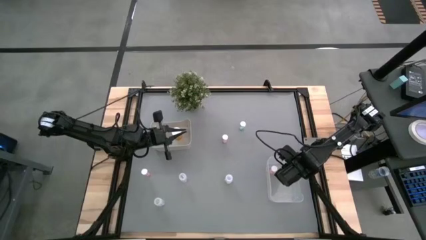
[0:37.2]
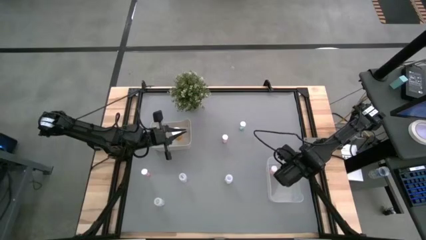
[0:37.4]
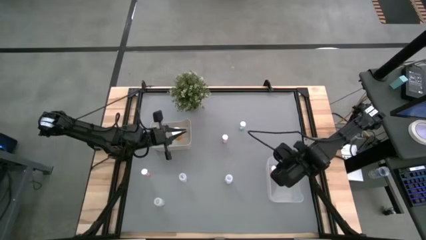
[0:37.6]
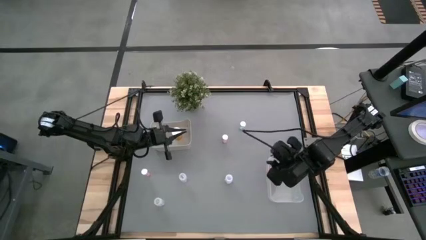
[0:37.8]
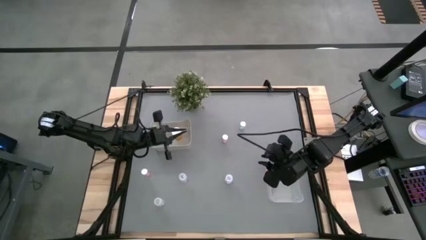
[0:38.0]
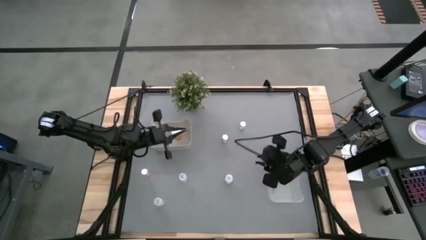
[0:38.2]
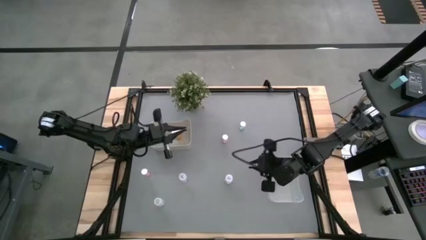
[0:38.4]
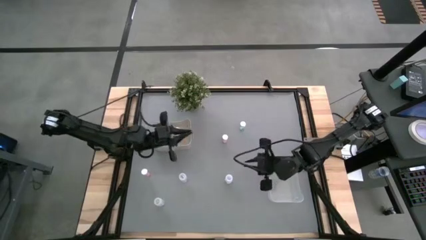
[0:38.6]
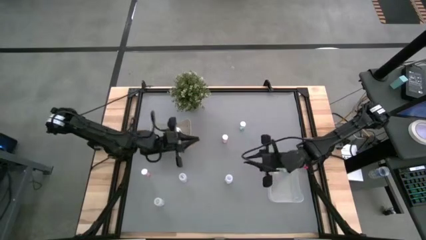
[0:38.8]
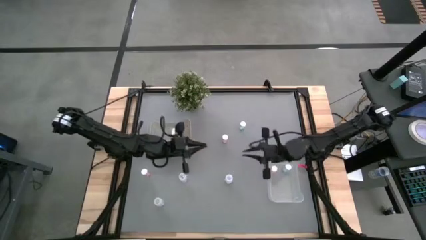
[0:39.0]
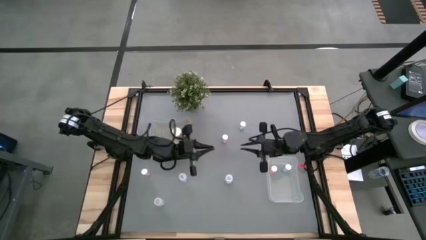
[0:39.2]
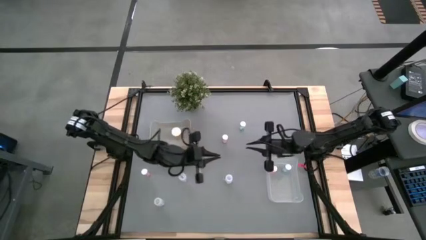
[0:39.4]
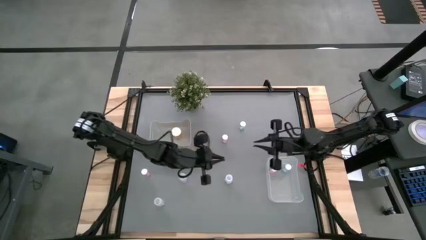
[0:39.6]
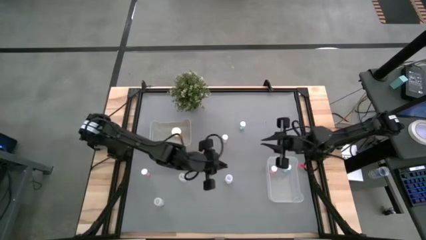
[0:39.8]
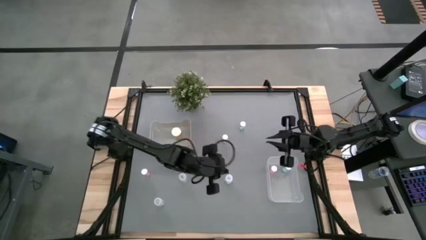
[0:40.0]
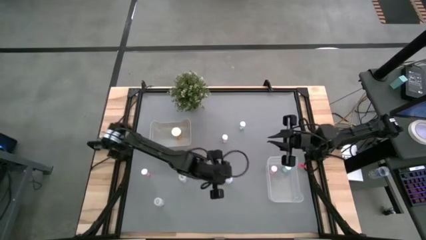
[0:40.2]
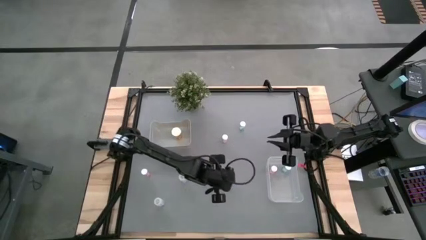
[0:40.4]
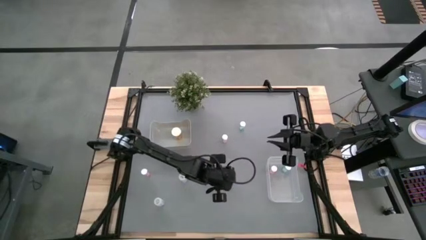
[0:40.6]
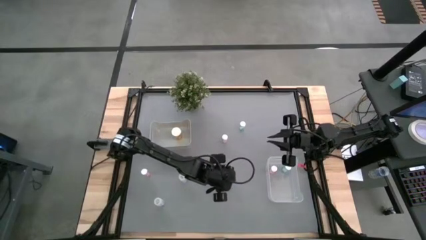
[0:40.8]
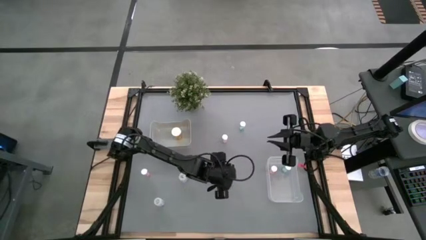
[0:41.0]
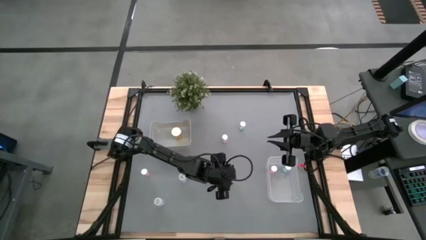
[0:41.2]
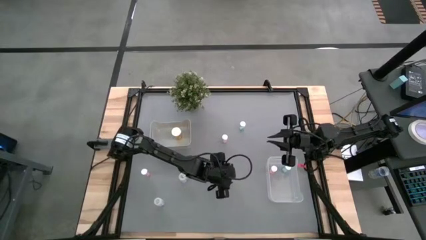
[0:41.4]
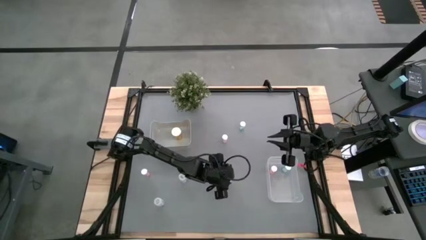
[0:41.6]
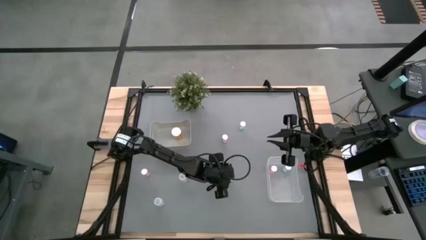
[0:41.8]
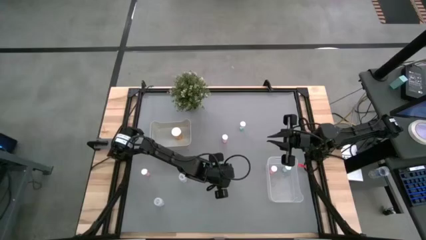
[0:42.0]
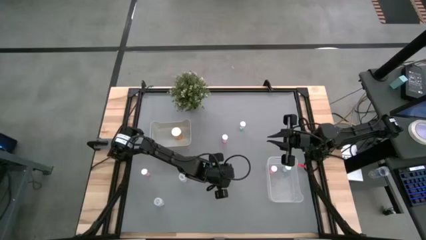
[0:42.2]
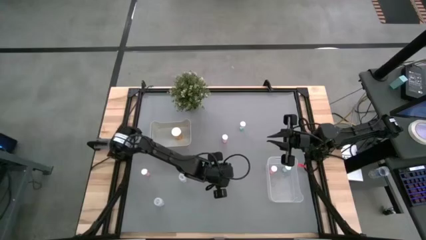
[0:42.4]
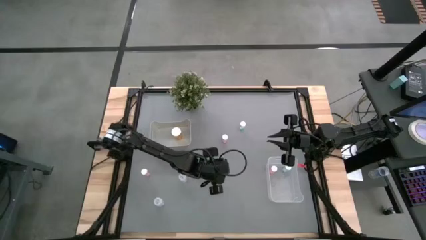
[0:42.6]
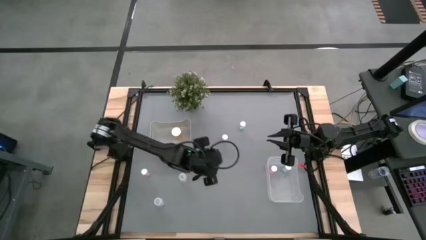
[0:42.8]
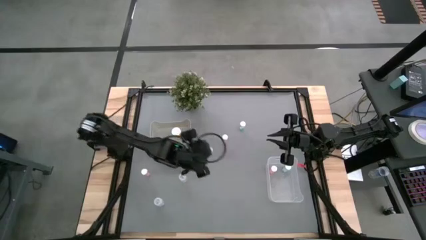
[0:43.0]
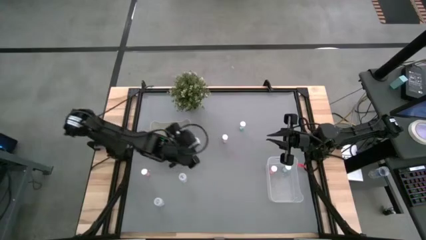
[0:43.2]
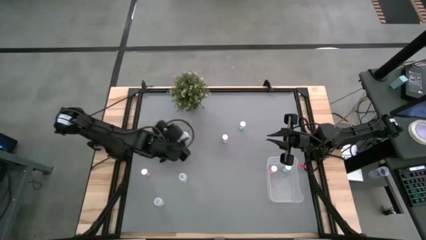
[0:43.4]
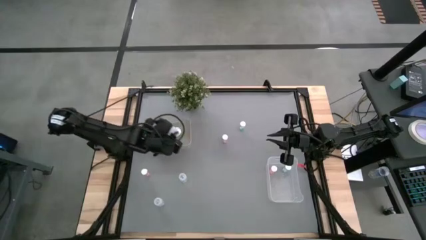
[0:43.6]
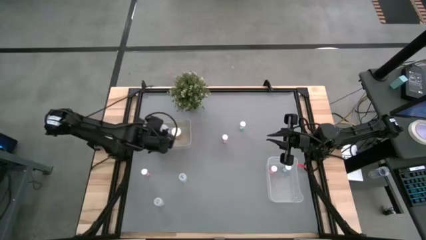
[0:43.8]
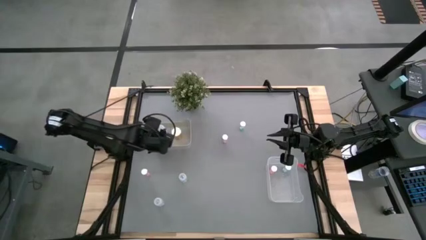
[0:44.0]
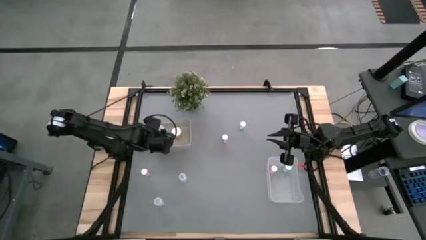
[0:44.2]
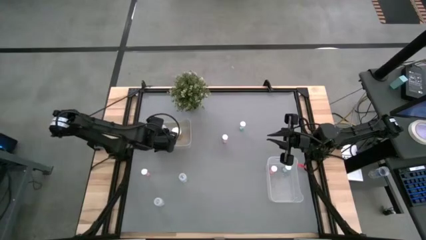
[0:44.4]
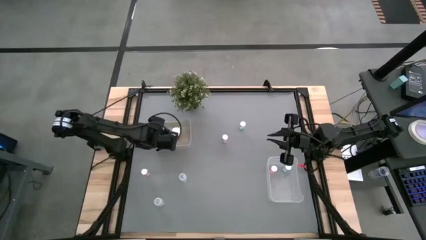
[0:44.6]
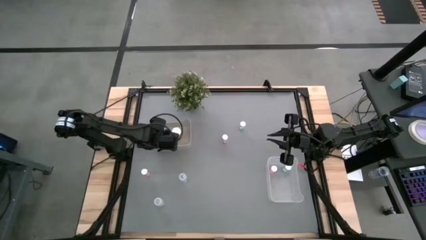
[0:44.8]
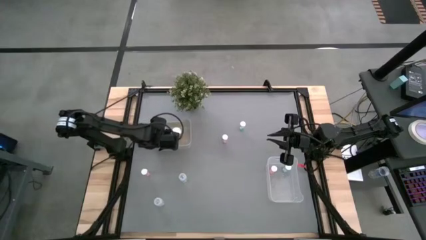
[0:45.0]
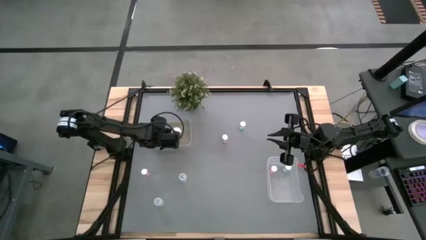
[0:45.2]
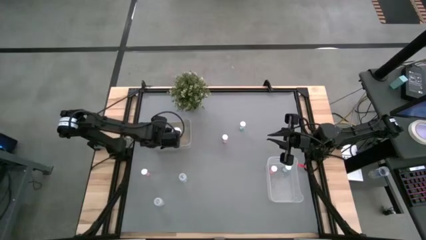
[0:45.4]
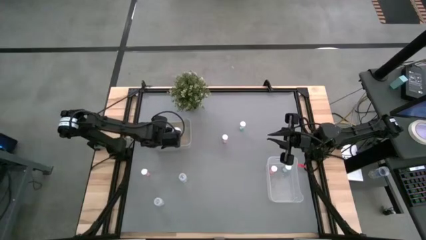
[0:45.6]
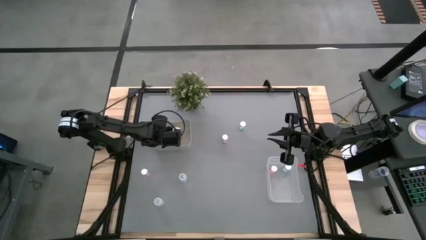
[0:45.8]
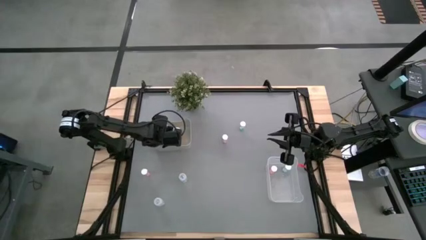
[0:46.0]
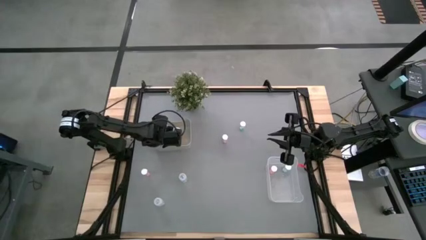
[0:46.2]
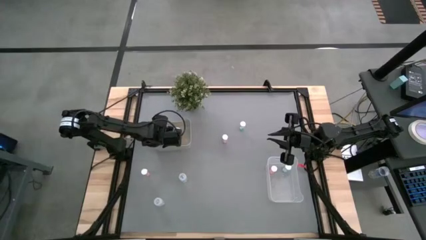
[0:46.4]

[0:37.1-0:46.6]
Task: Pick and place medicine bottles into bin by pill shape (circle, oval)
Put the top right transparent pill bottle into the gray bin

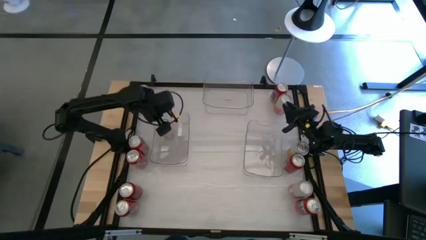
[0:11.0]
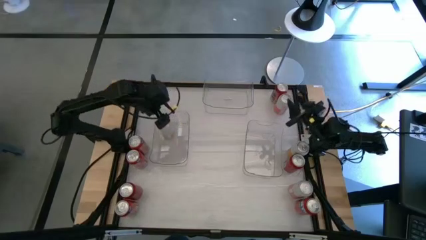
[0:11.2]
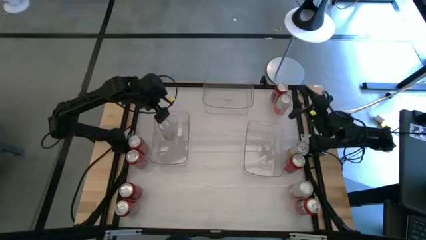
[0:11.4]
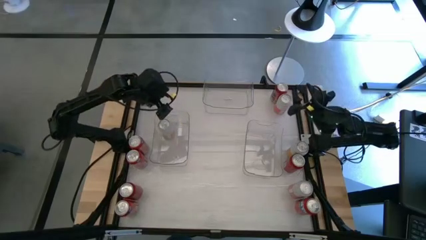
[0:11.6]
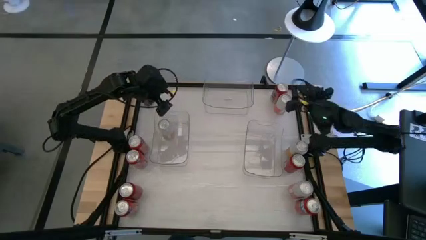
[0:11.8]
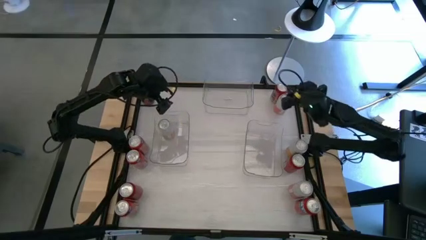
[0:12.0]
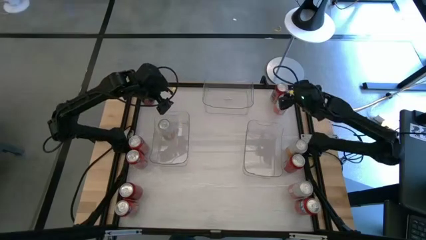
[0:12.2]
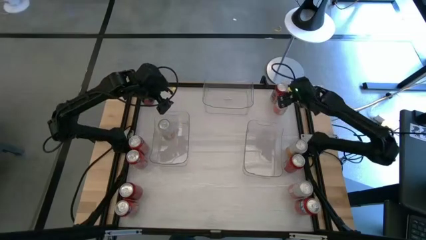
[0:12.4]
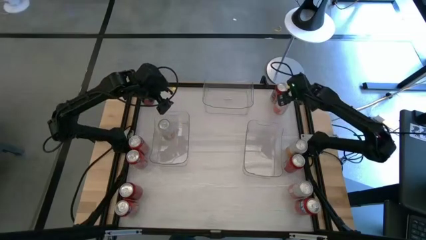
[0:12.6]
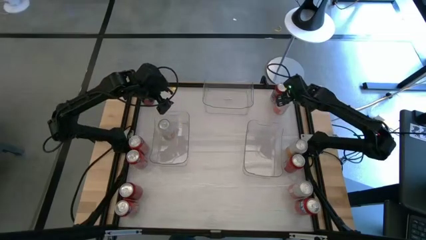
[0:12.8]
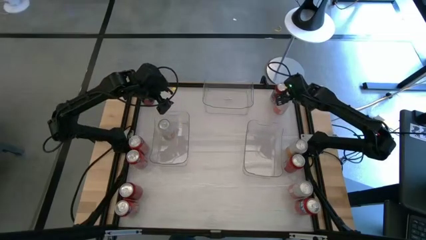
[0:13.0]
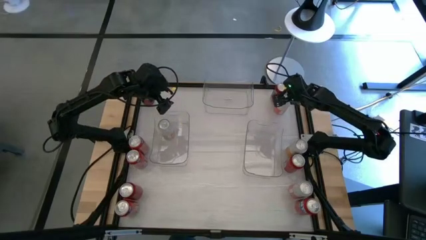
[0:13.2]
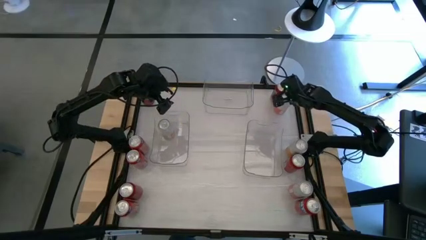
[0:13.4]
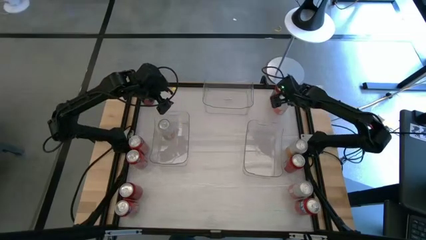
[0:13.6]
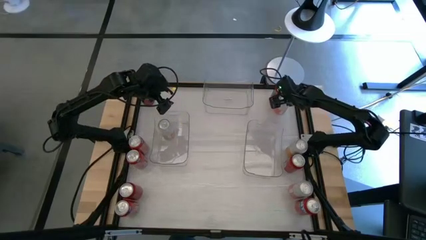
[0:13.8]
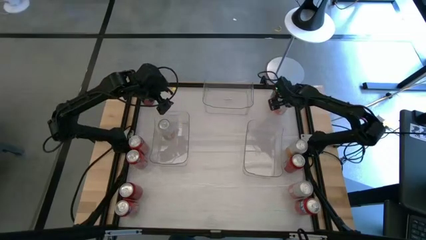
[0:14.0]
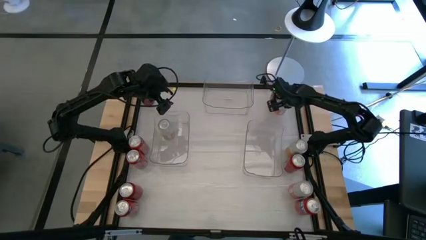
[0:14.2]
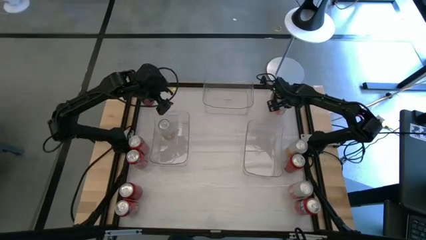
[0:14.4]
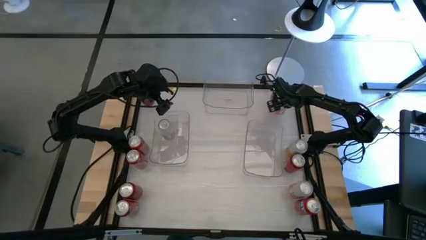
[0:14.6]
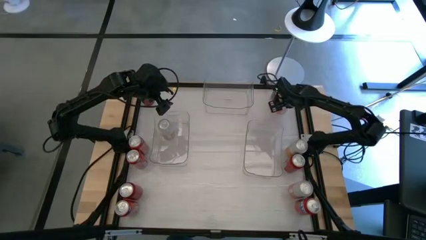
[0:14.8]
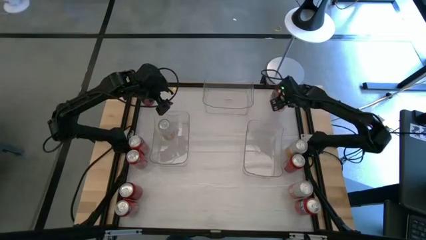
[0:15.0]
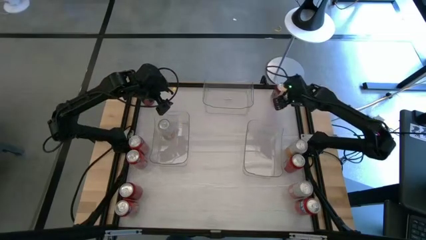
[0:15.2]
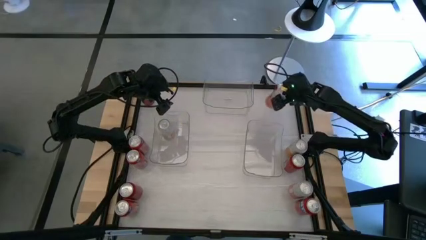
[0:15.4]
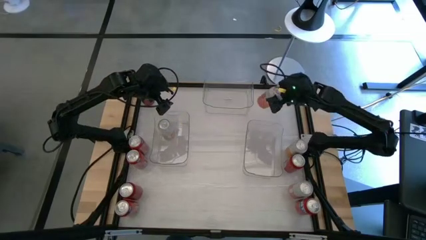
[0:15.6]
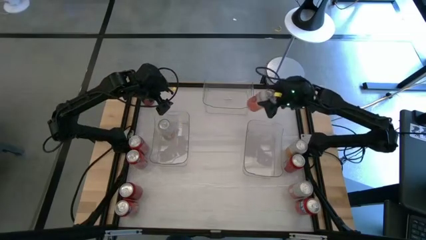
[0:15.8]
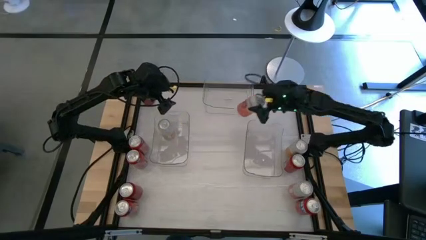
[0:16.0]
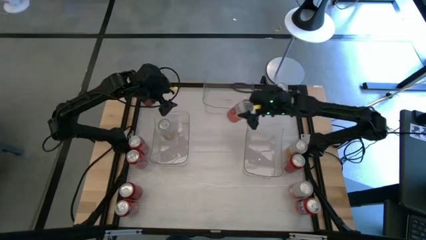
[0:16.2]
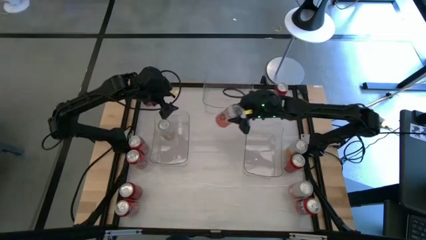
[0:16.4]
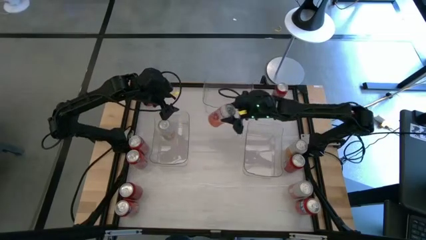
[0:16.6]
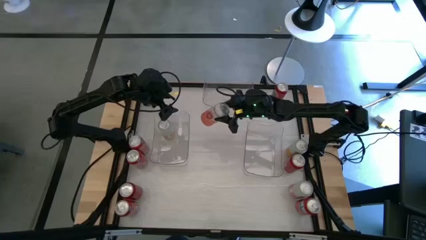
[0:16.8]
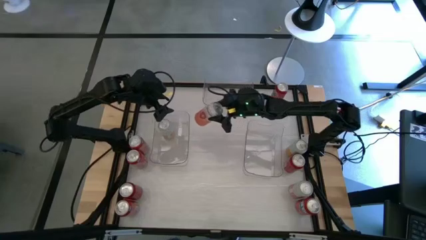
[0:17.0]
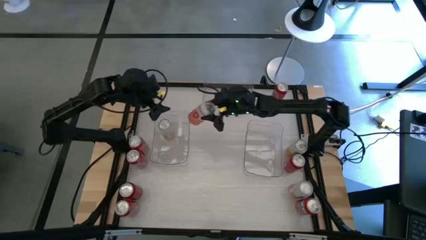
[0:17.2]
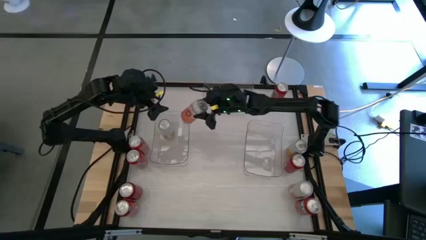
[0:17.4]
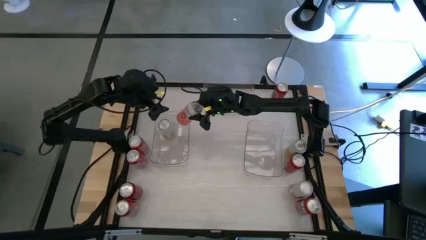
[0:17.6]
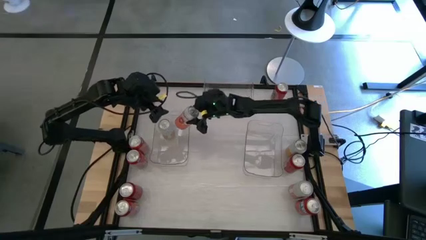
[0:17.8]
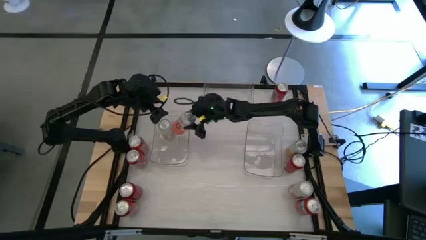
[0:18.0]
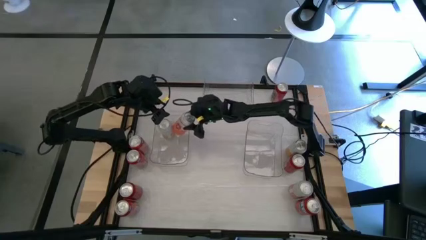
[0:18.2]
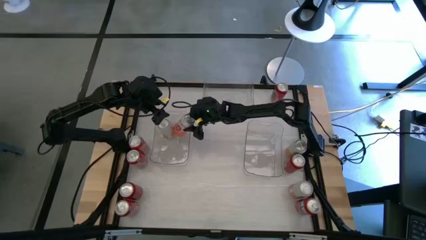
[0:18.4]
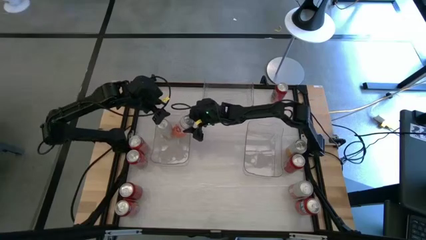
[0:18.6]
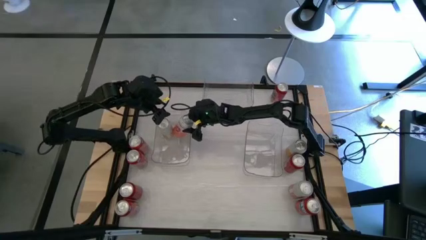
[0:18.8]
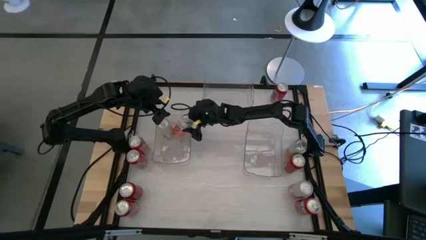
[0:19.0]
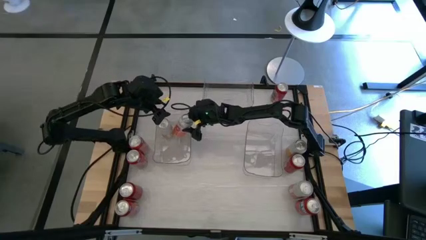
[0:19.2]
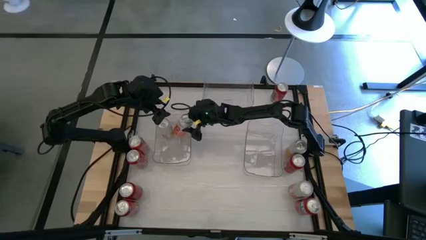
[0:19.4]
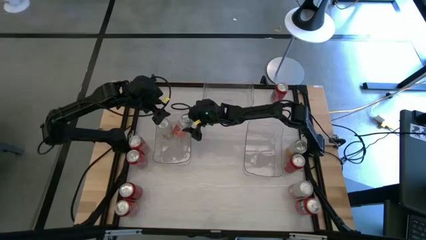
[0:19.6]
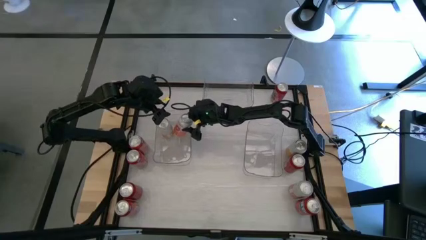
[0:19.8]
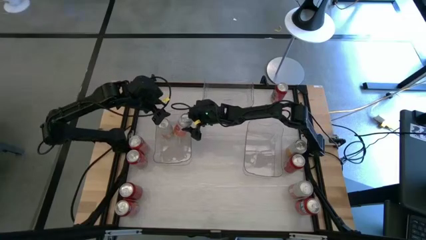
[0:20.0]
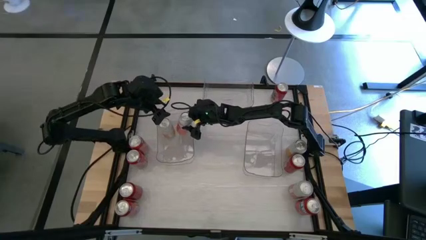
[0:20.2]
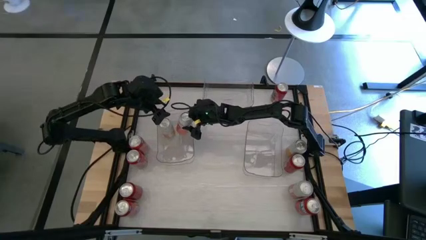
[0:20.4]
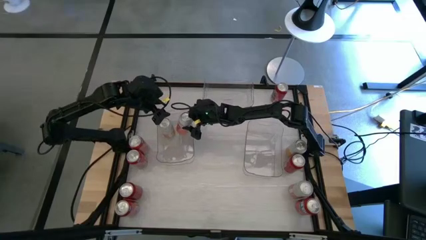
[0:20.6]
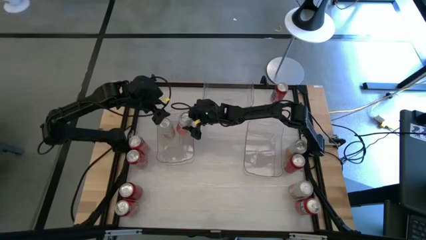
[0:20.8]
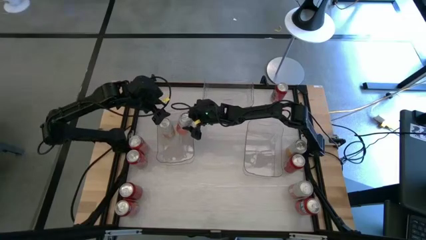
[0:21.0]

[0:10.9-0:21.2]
Task: Sort soda cans
Put the top orange white soda can into the left transparent bin
